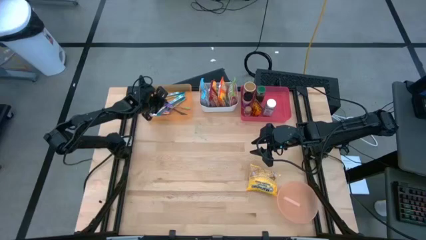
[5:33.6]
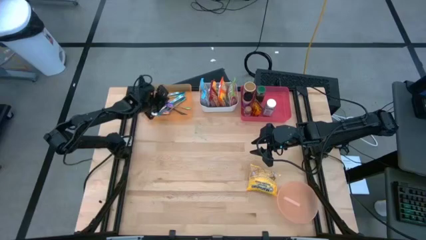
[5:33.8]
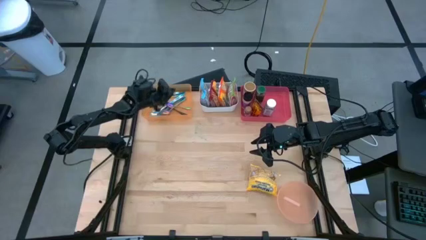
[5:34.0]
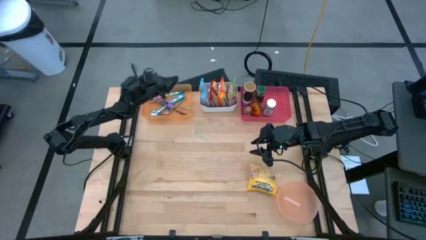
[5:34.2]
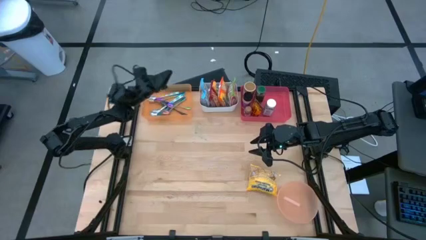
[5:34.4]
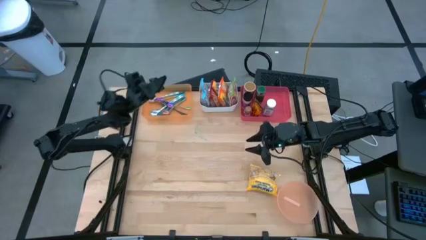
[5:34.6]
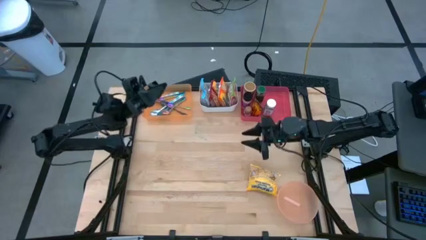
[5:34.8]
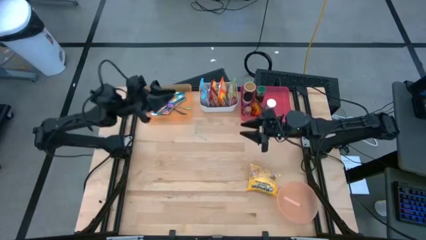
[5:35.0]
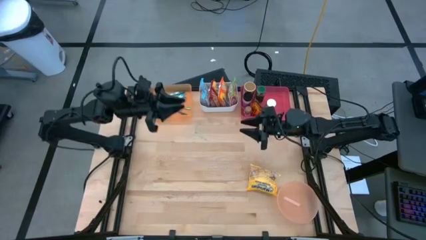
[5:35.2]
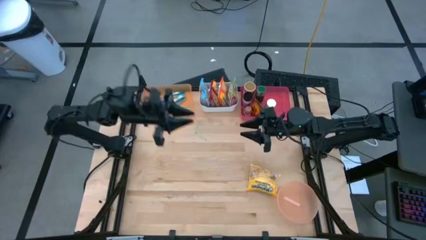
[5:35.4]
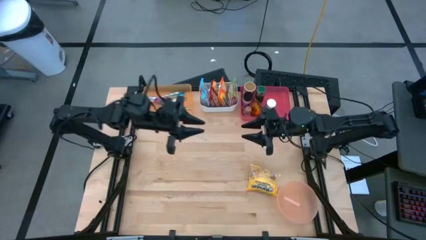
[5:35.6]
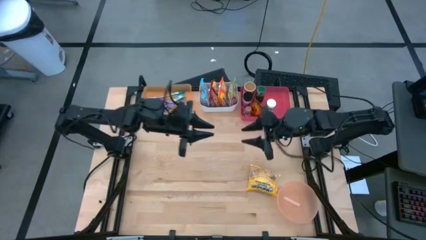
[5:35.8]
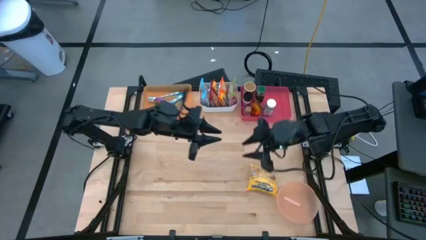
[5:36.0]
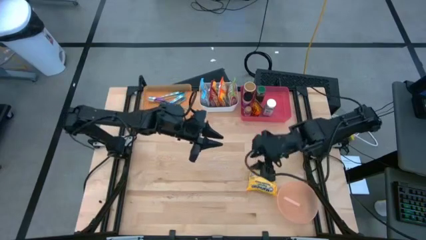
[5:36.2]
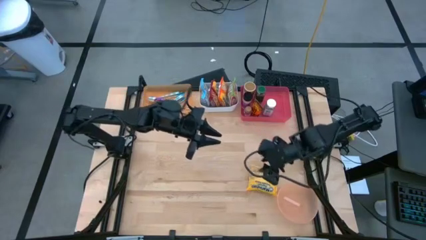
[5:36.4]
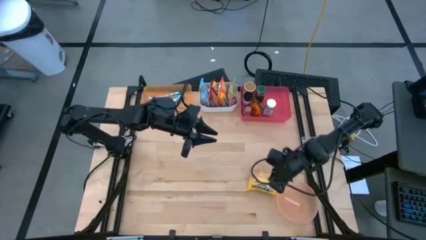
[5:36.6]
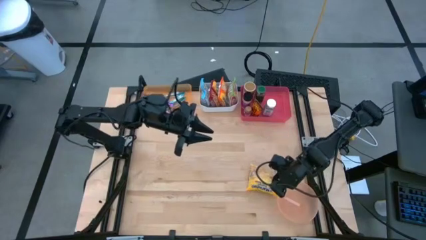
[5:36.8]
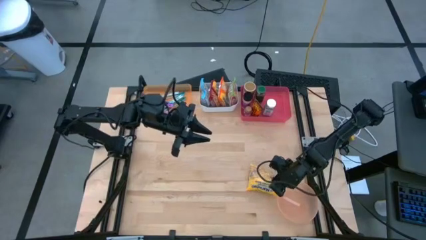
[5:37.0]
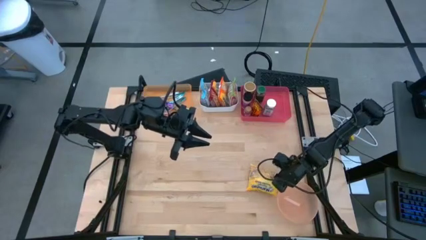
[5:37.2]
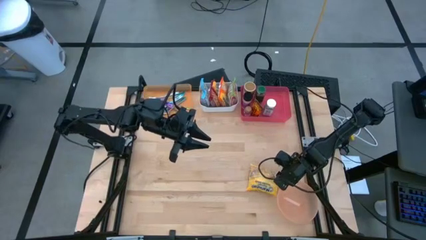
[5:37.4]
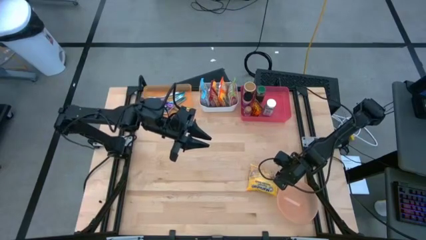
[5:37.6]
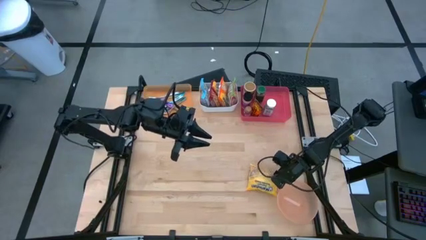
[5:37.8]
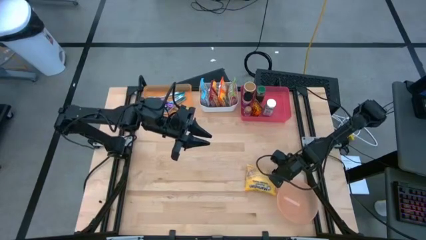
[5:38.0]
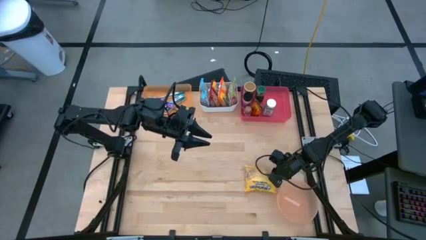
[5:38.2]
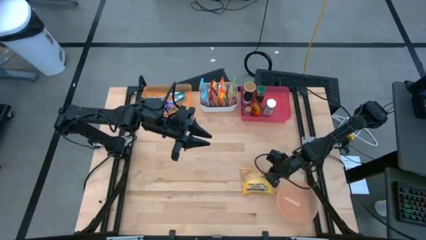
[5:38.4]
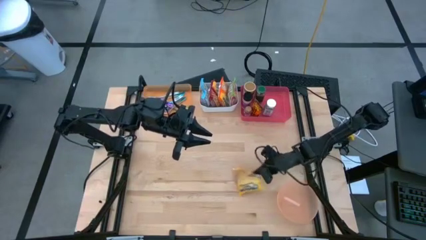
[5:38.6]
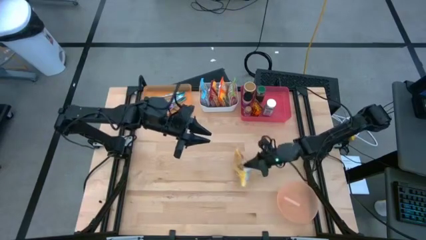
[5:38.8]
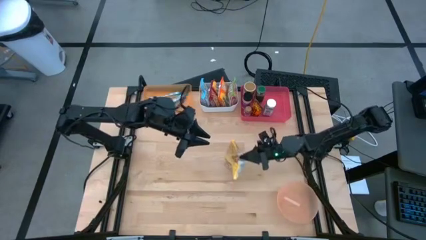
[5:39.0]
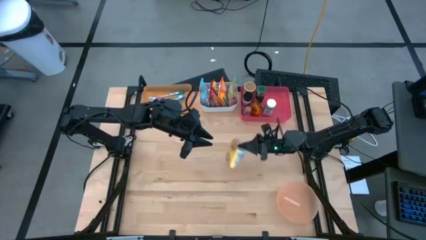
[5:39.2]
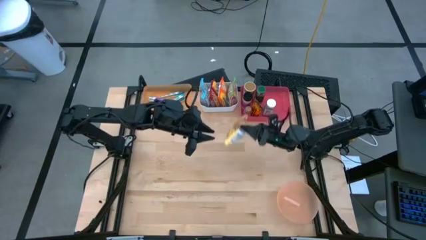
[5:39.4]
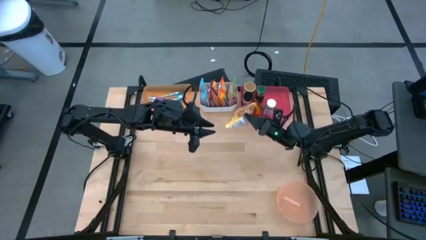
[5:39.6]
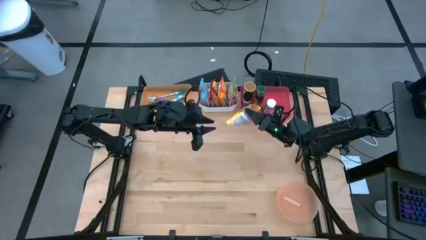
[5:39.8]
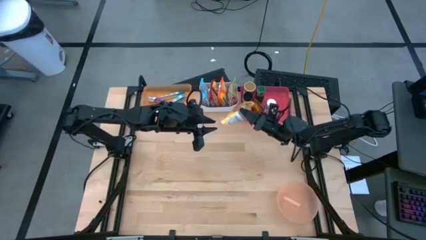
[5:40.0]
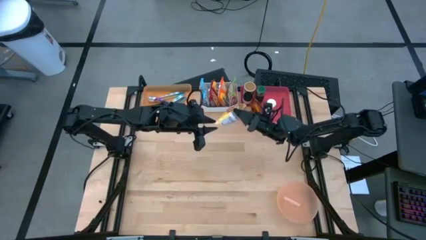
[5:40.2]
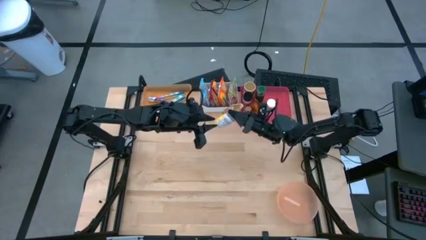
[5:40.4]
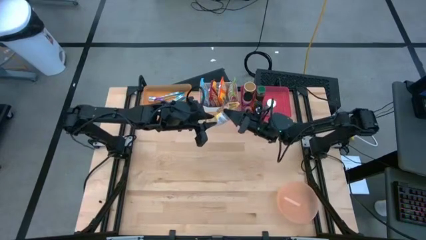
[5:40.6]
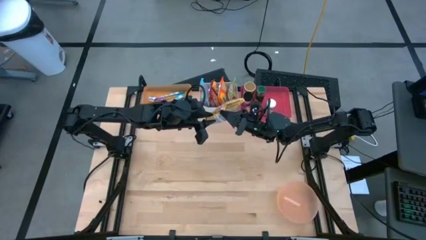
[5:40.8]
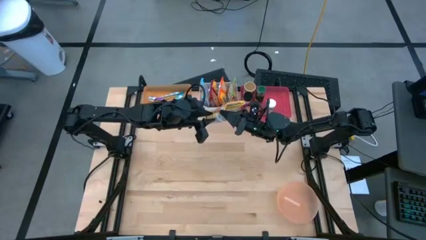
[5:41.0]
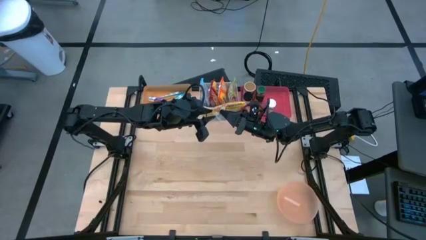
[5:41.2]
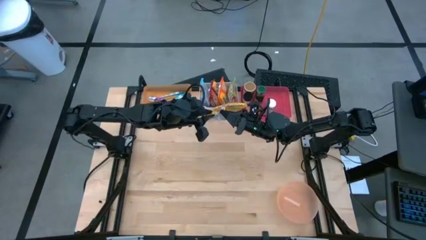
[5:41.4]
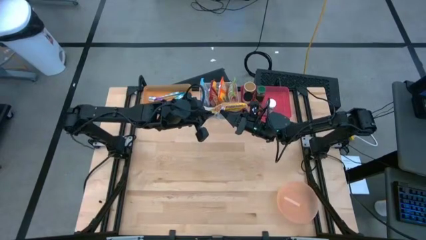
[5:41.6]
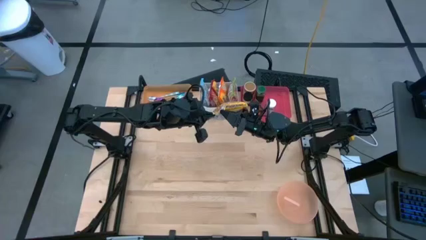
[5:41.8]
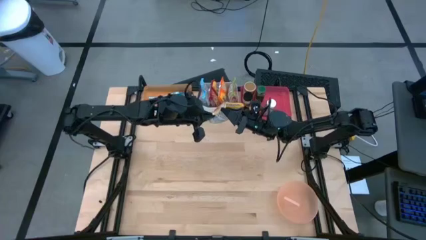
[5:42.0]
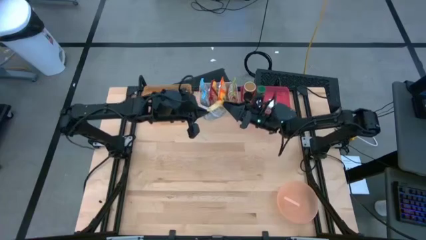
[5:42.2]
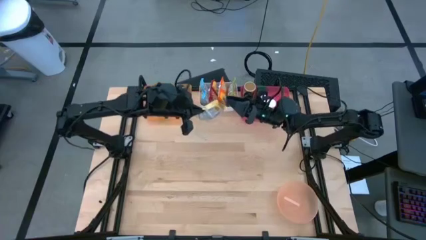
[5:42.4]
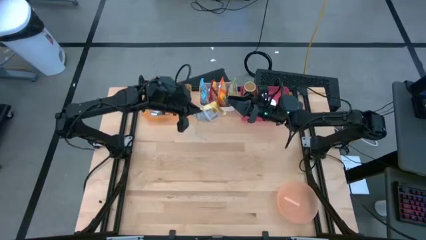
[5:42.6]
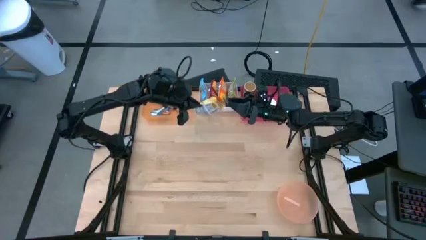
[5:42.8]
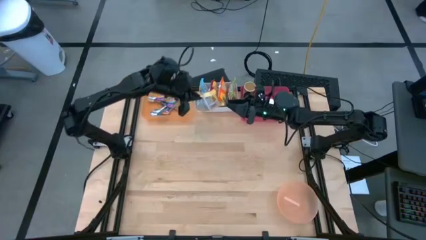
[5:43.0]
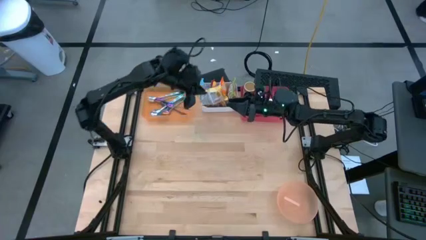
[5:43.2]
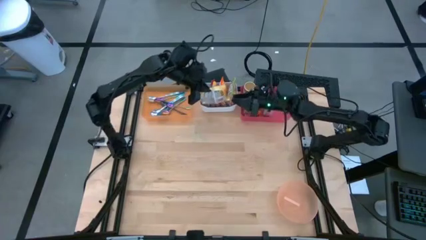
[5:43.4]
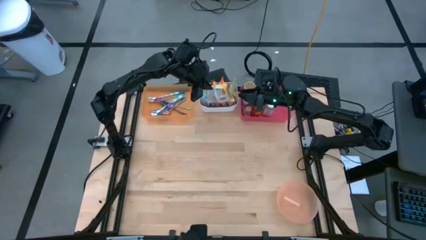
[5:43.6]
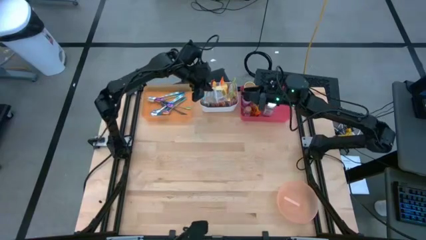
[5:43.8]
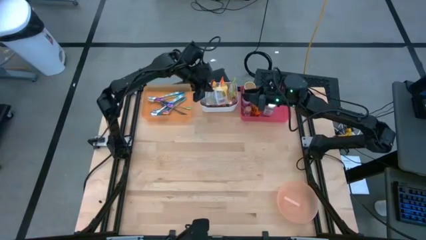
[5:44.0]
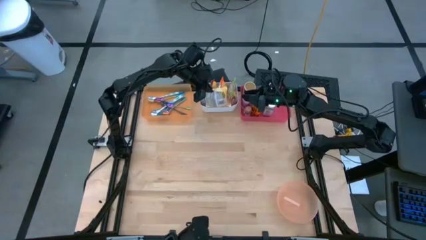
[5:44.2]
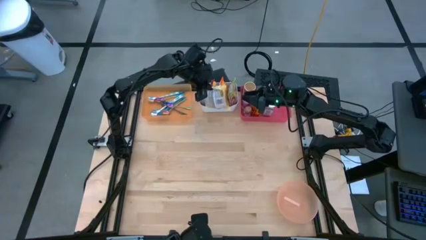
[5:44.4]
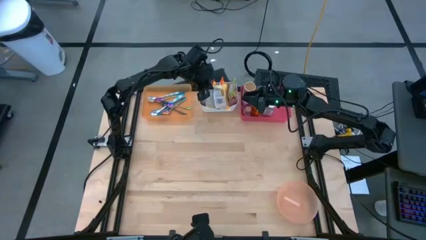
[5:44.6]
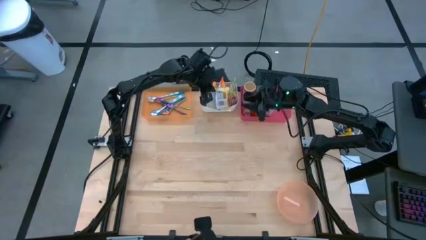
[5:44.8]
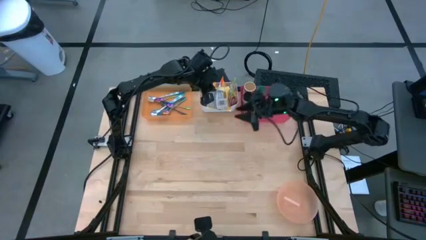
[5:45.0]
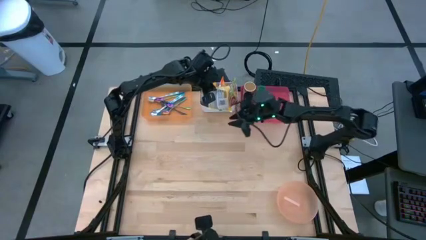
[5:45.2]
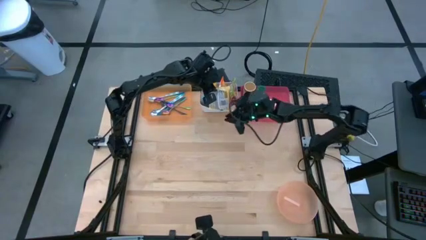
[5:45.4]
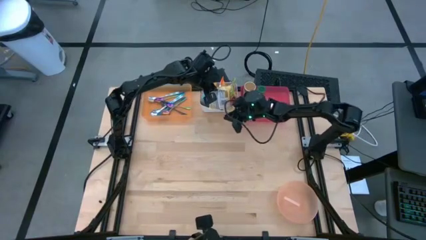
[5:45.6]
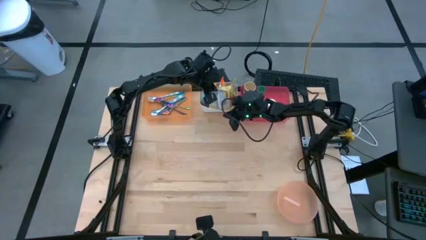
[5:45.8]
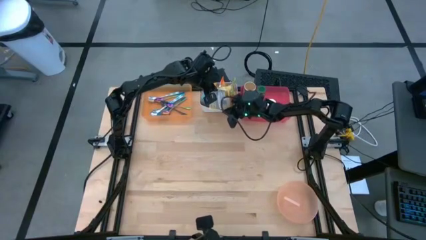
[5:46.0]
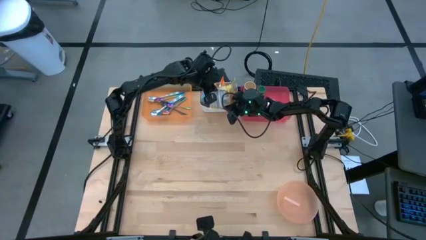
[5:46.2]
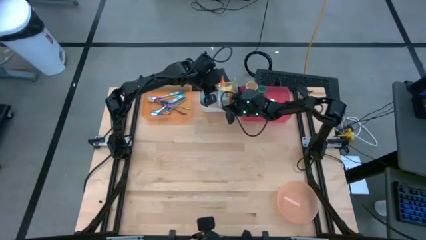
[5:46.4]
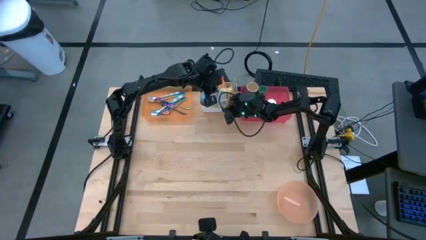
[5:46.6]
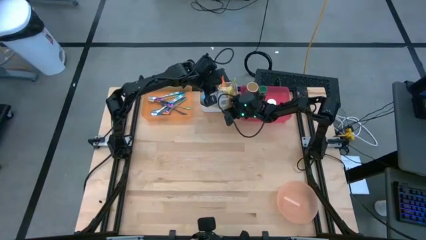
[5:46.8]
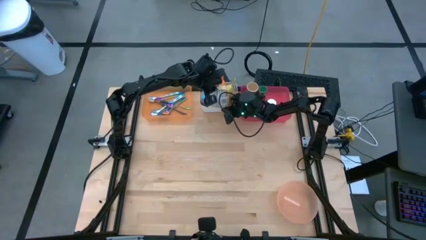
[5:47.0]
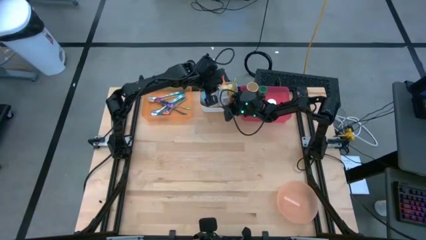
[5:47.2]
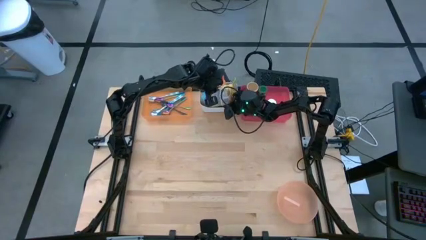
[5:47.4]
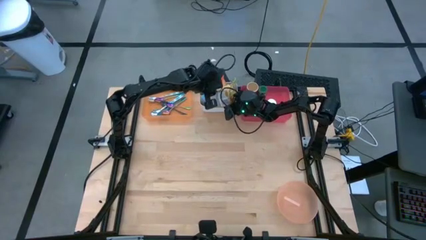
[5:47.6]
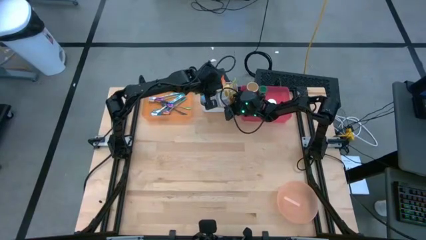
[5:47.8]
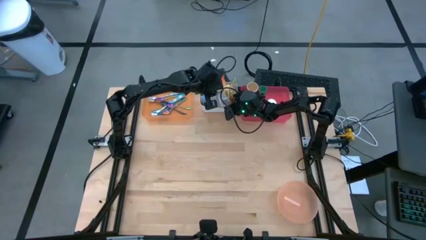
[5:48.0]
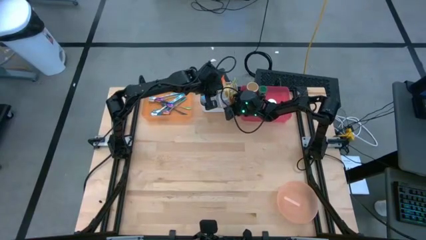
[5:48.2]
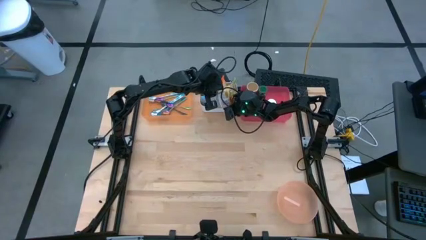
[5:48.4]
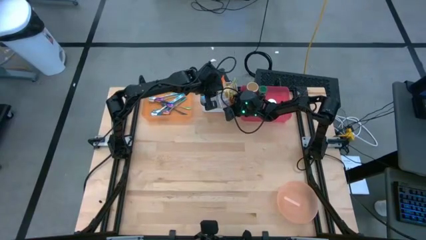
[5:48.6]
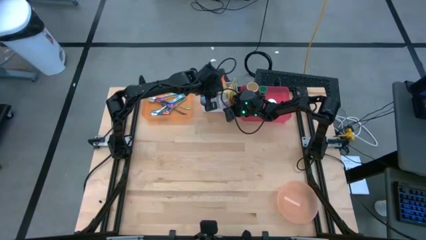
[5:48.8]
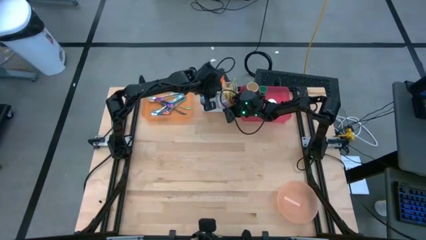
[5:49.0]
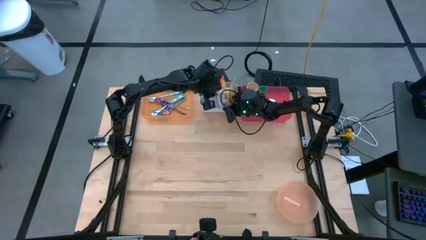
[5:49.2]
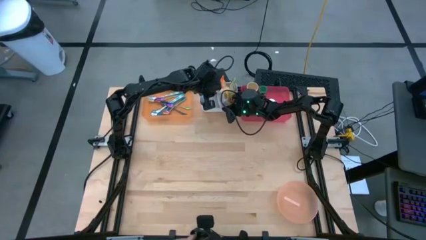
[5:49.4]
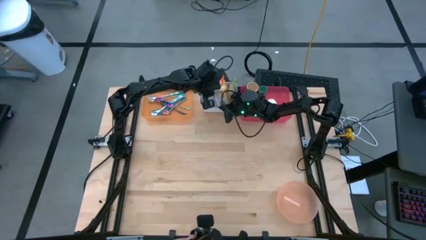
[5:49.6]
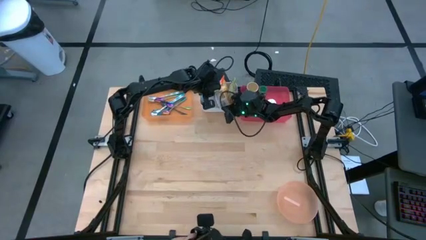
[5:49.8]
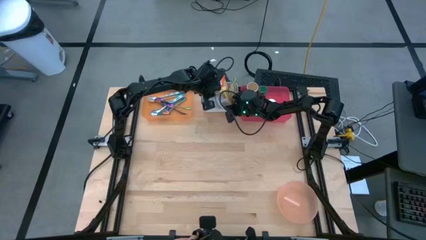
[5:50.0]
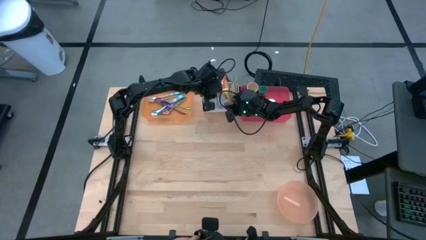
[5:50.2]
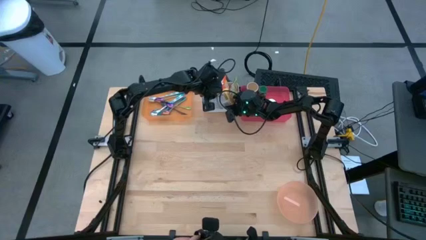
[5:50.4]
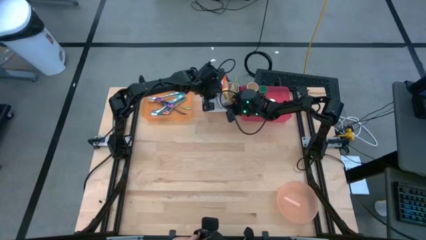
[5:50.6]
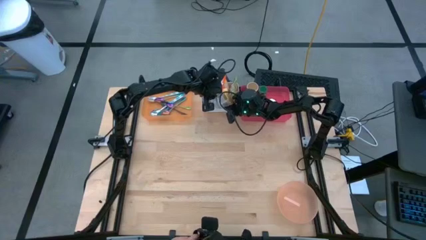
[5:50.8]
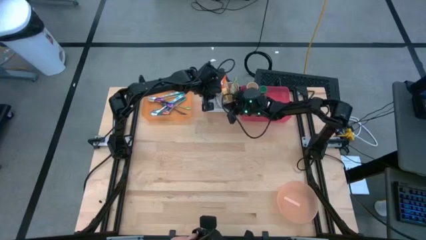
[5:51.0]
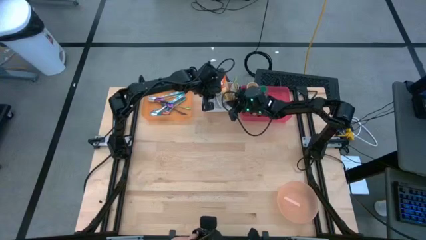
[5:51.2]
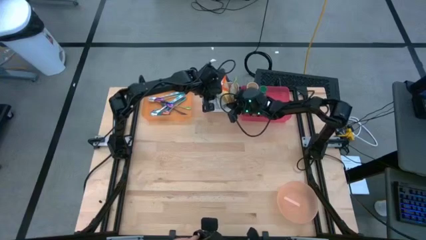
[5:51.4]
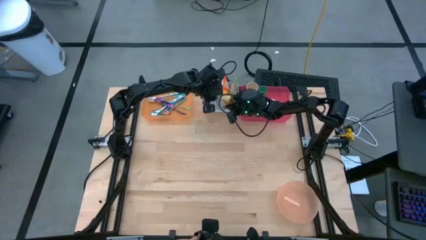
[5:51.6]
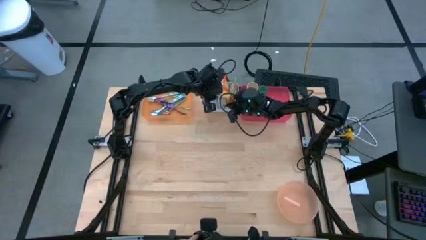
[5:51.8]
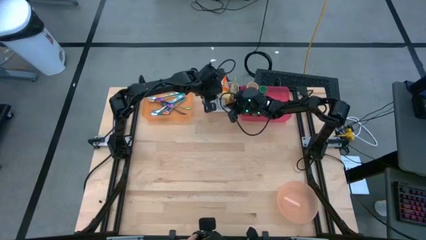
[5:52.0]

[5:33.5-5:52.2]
Task: Pick & Place Food Item
Put the yellow noodle pack into the white bin
